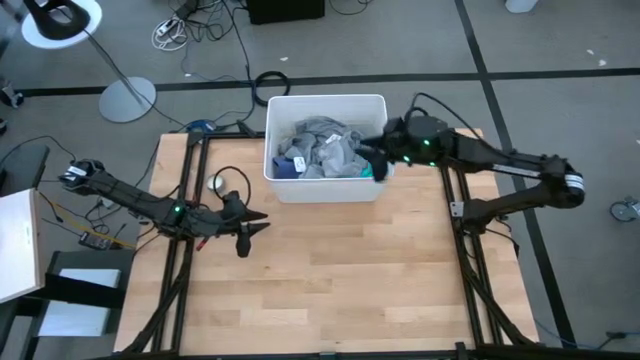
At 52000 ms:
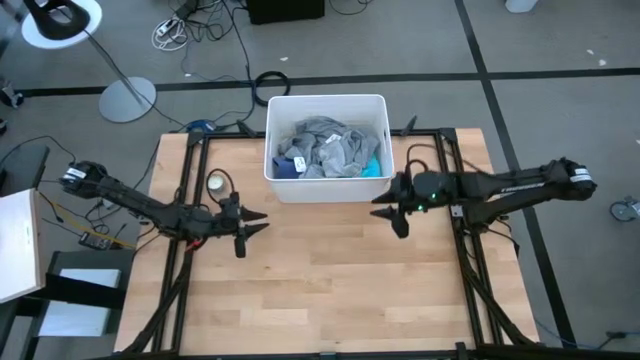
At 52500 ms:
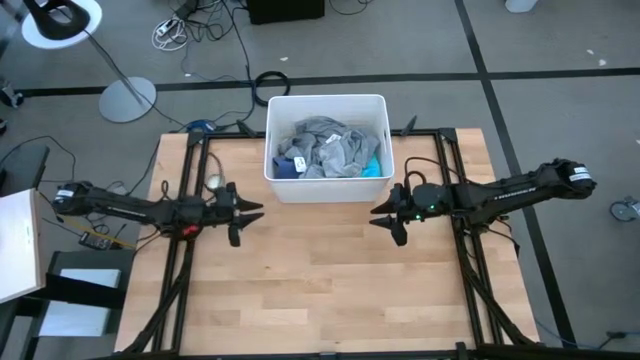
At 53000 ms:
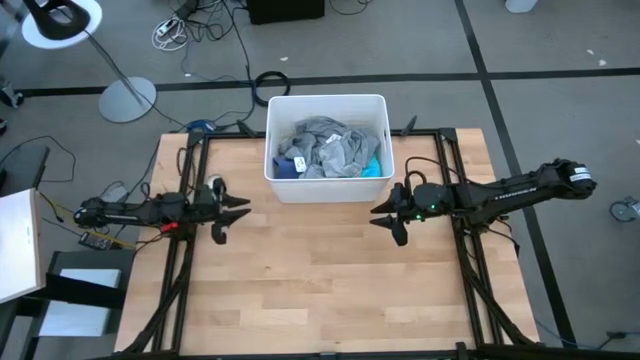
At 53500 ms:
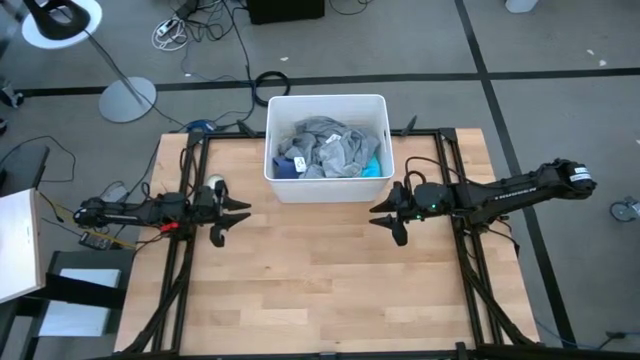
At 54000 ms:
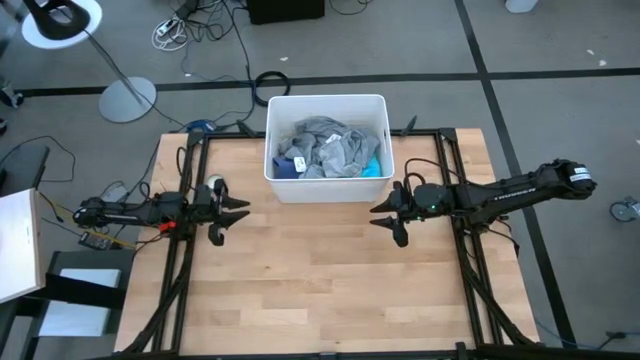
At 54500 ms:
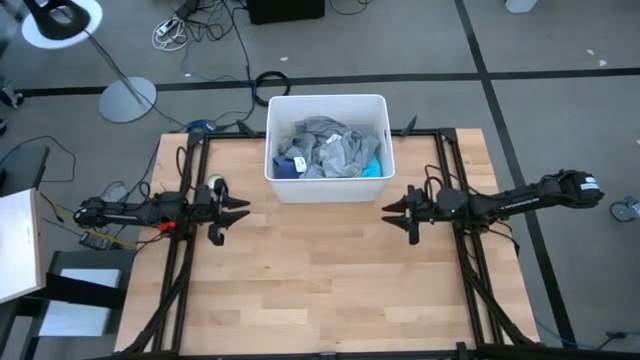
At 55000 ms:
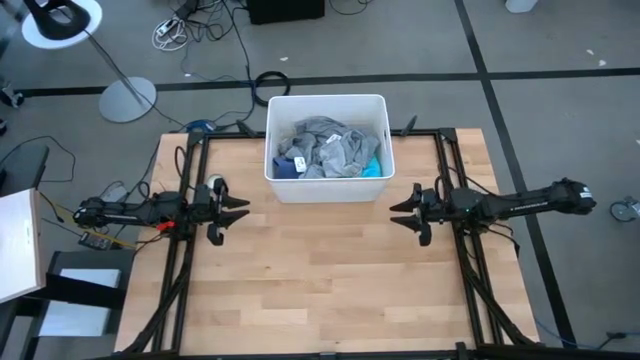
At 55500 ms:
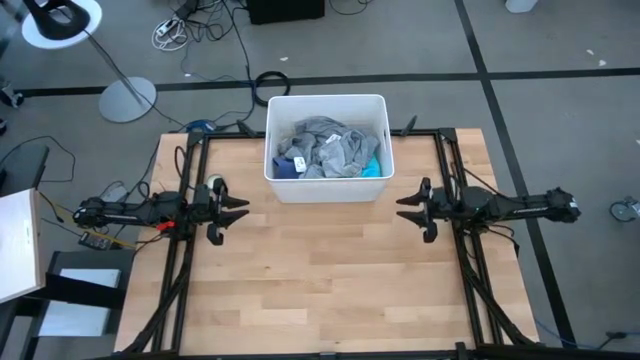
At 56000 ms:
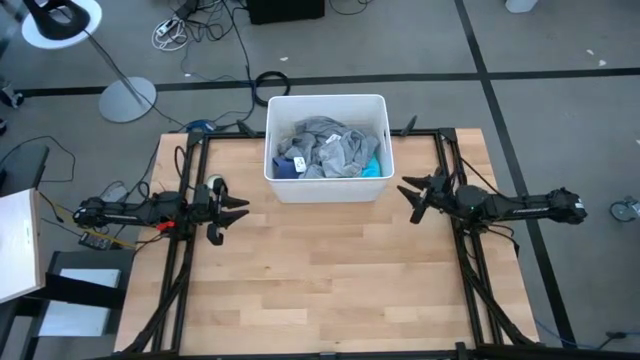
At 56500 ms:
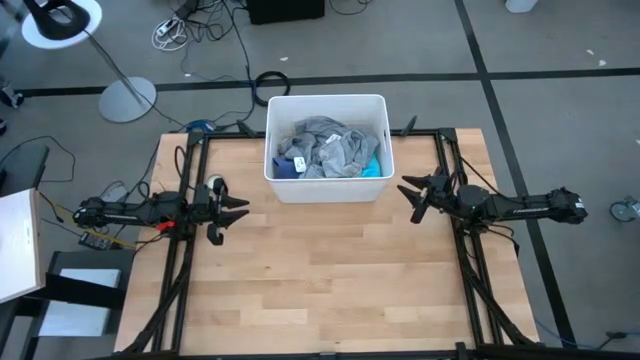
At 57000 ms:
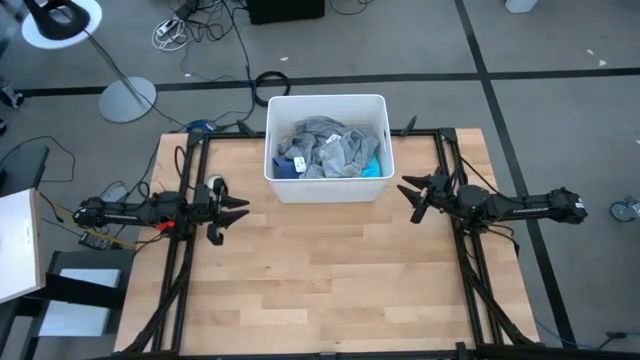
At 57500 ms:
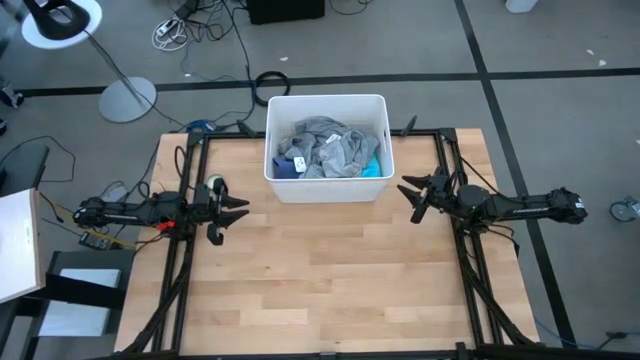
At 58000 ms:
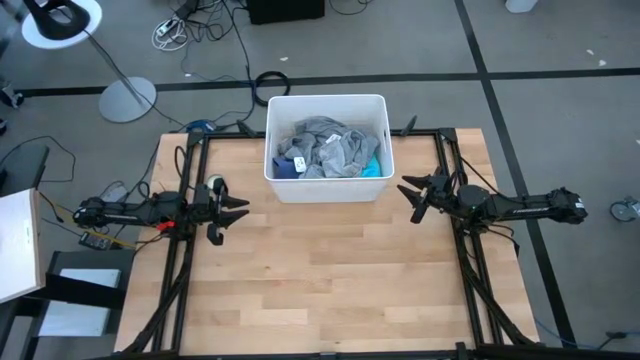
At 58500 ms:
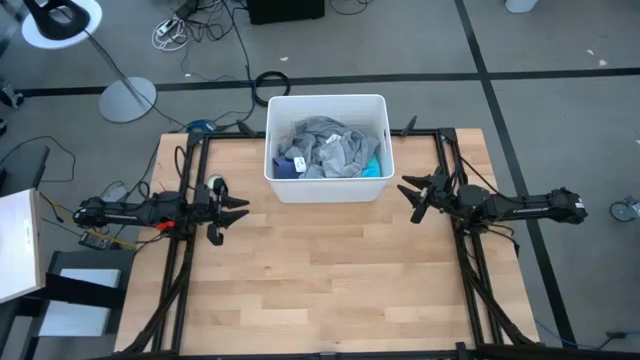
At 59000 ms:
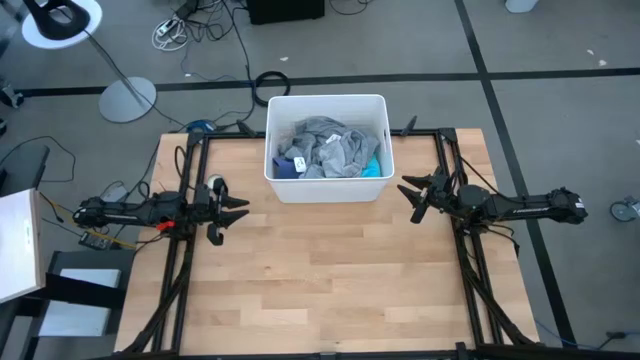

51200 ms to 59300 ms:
Task: Sort clothes
Return to Home Position

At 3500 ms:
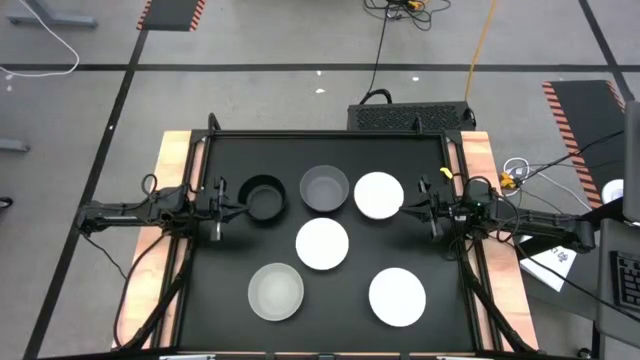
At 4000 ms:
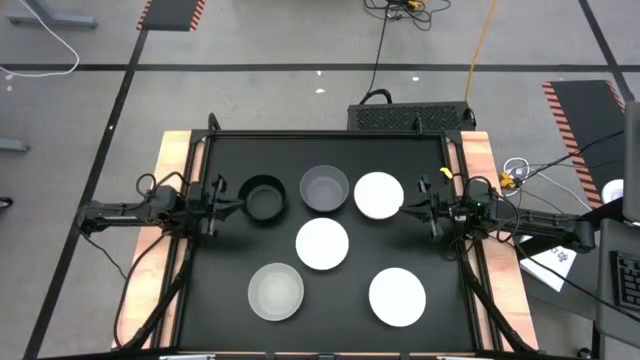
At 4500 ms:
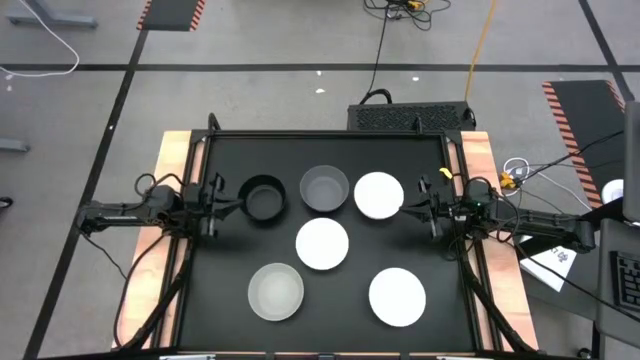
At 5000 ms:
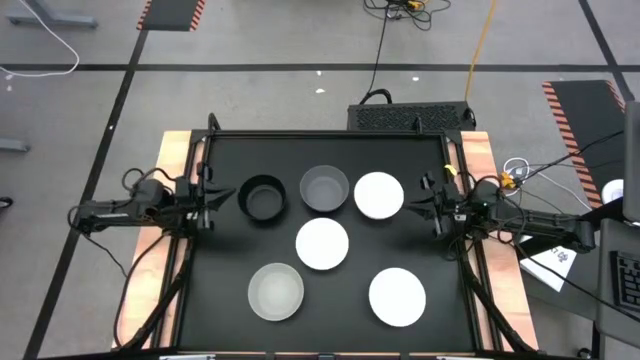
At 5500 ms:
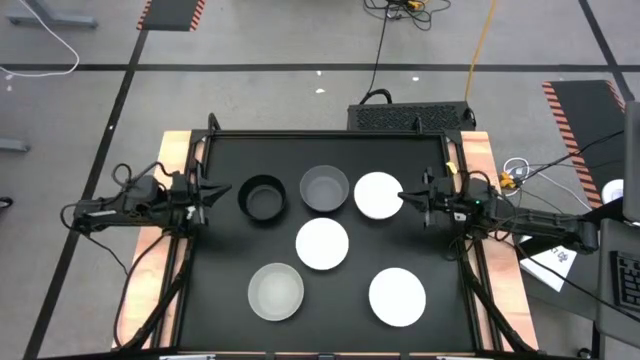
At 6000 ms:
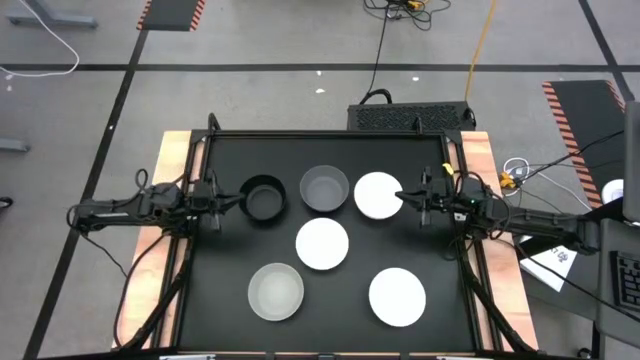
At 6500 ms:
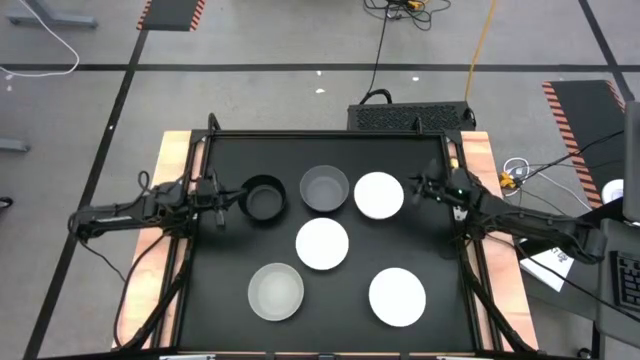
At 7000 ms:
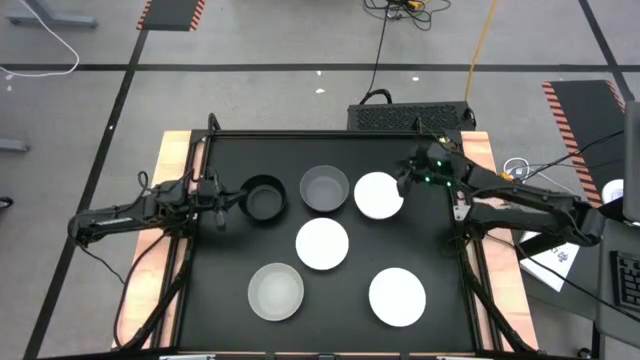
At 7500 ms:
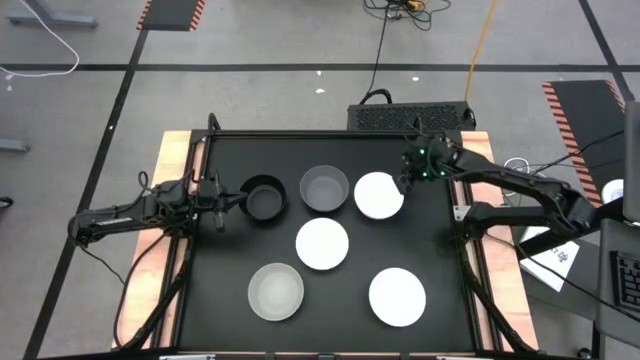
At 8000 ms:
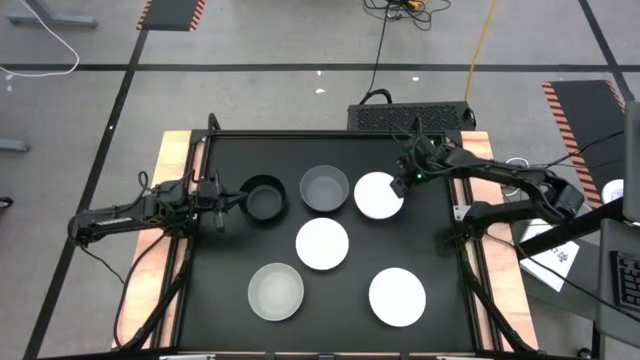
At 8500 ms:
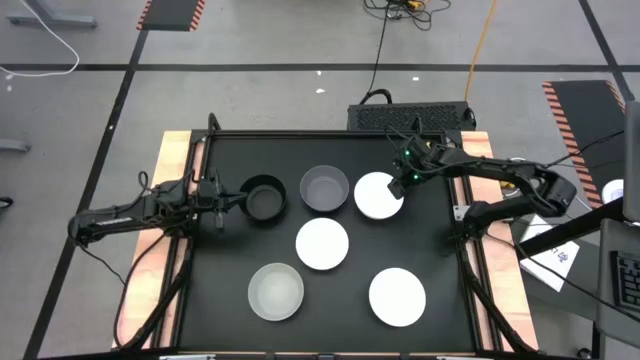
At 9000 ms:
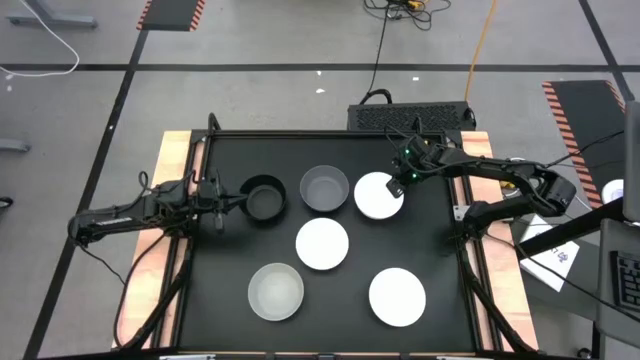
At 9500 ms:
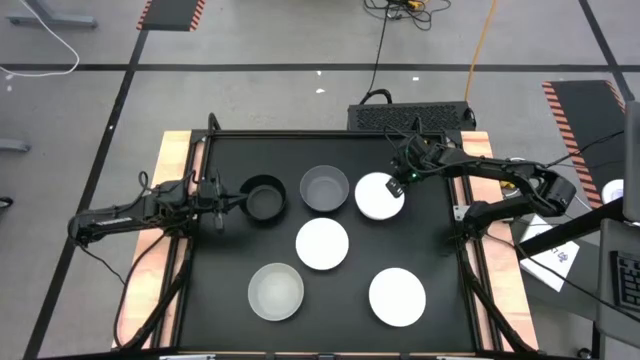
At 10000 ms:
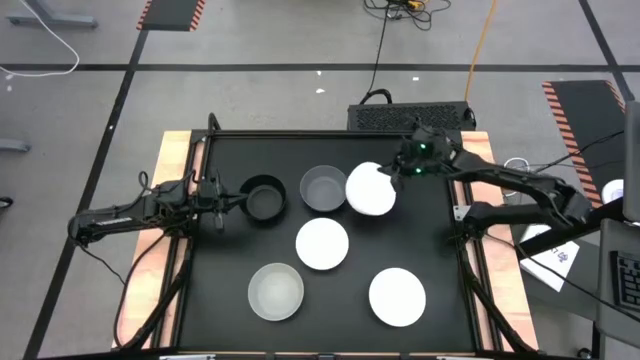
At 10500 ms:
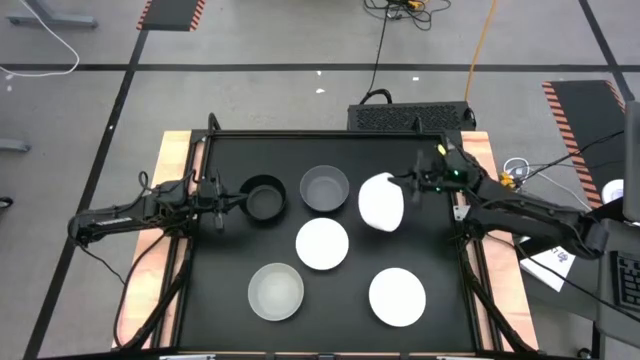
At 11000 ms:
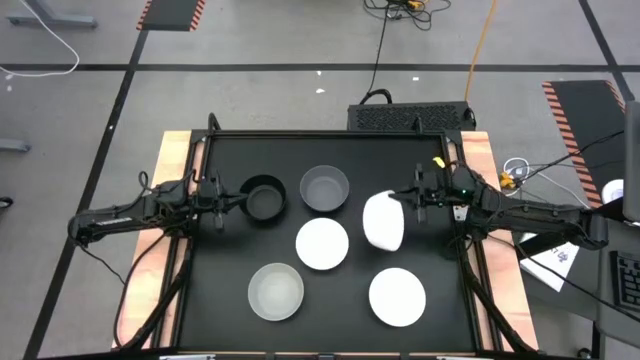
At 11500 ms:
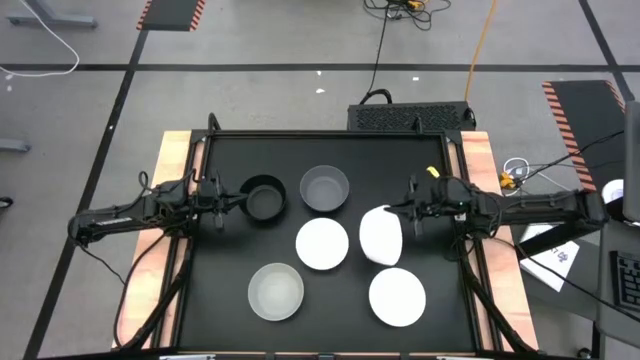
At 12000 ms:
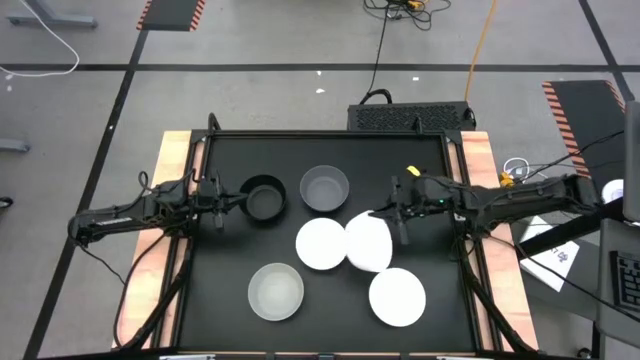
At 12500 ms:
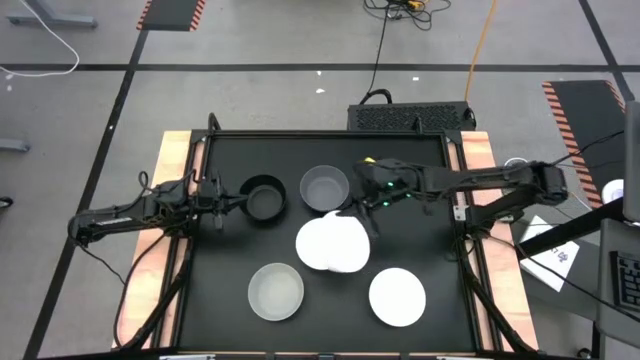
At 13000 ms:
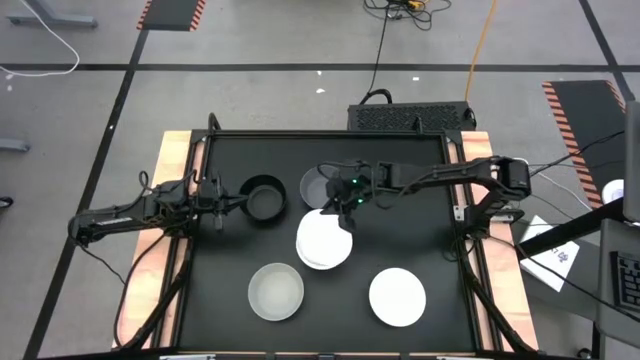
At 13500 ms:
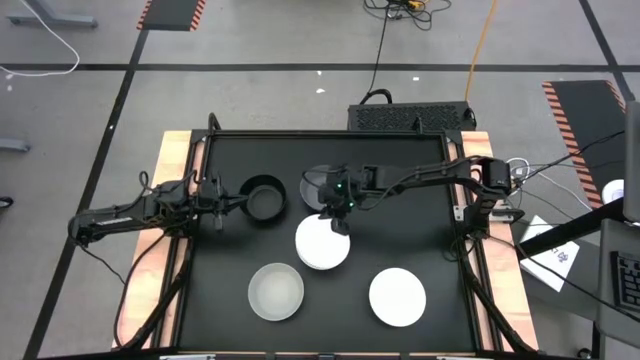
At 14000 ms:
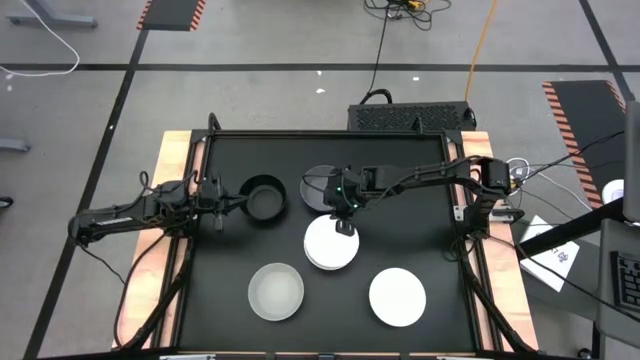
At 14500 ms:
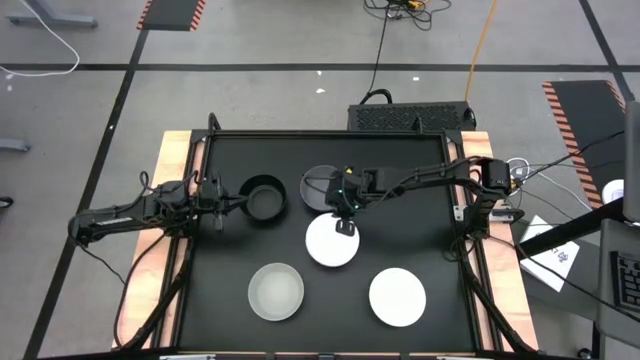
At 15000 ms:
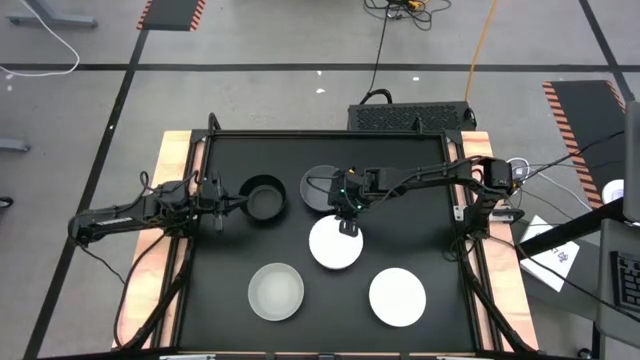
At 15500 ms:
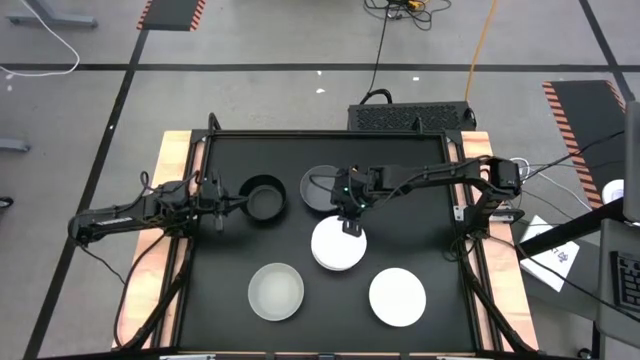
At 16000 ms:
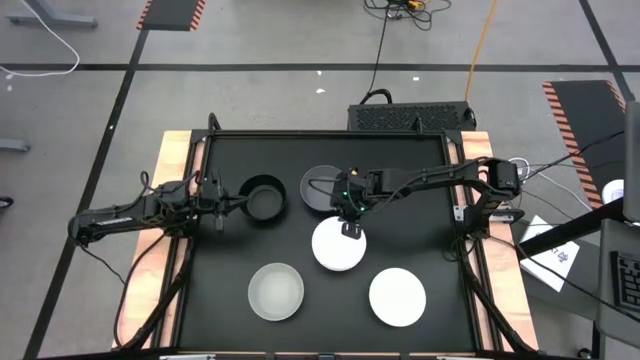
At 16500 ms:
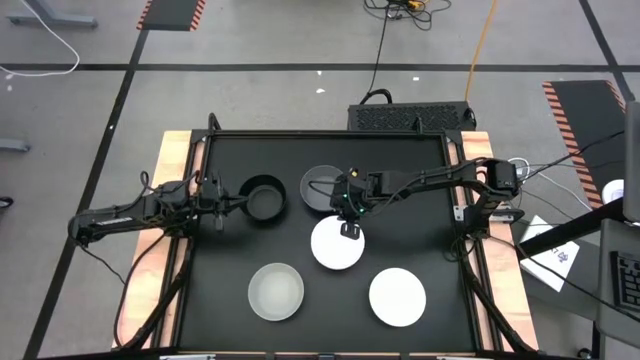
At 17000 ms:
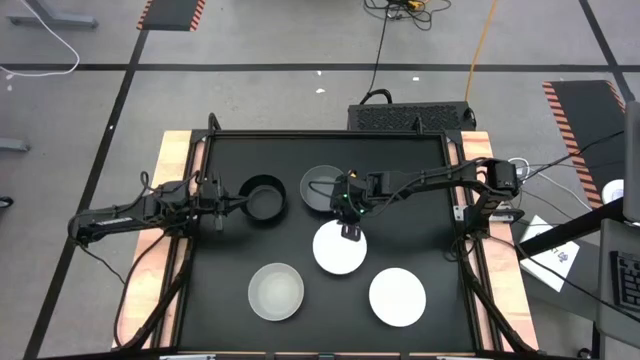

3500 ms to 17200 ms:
Task: Nest bowls inside each other
Stack the top white bowl on the middle white bowl
